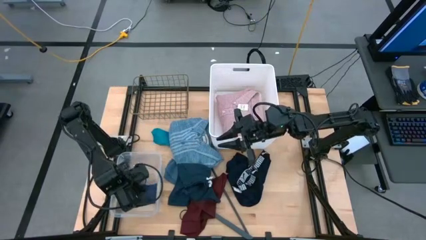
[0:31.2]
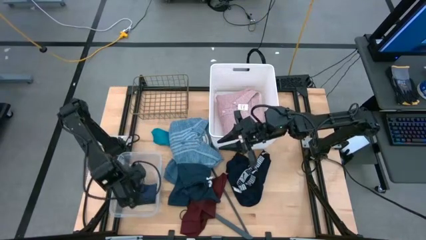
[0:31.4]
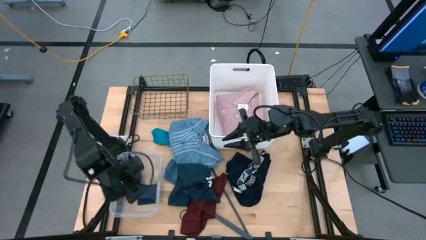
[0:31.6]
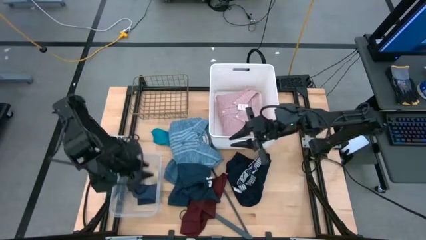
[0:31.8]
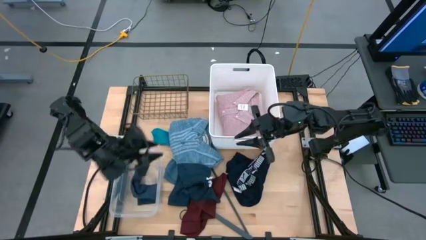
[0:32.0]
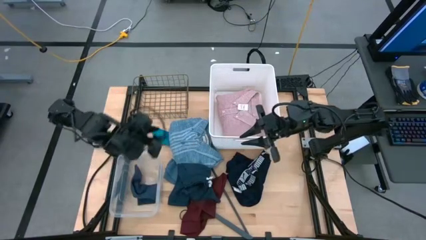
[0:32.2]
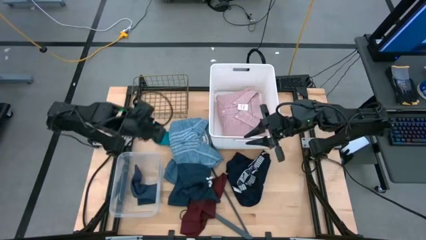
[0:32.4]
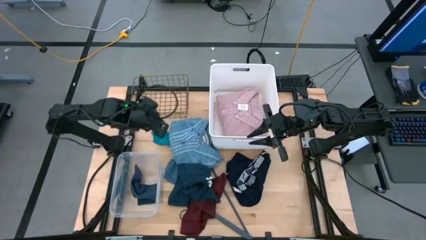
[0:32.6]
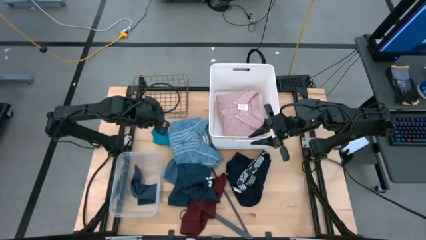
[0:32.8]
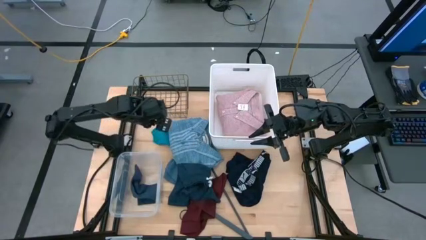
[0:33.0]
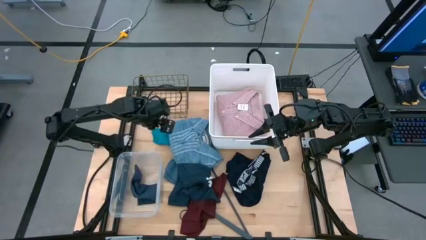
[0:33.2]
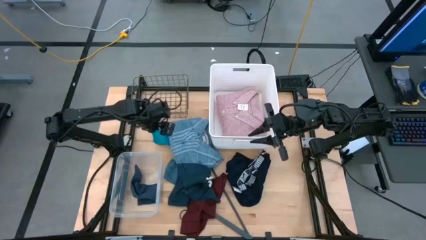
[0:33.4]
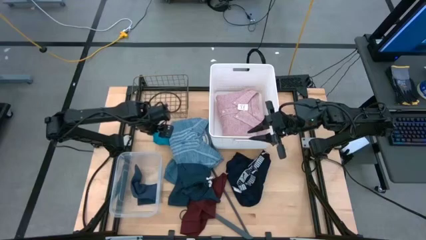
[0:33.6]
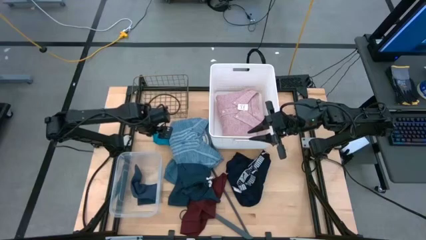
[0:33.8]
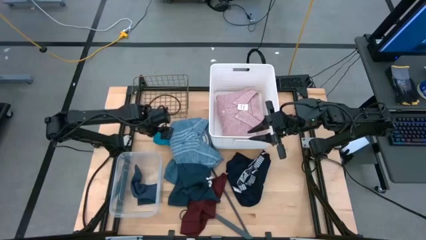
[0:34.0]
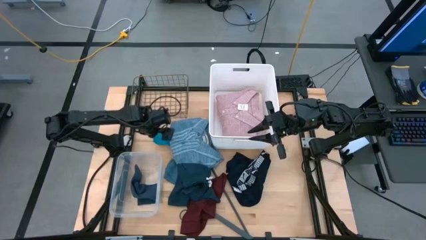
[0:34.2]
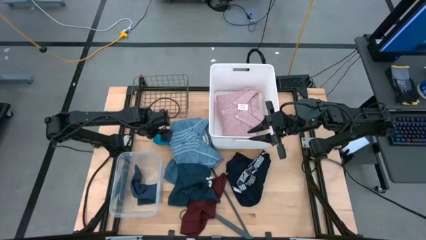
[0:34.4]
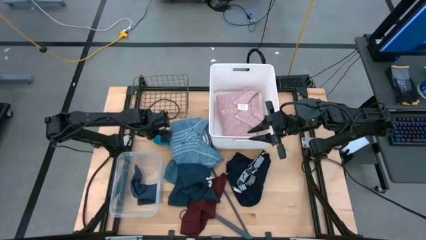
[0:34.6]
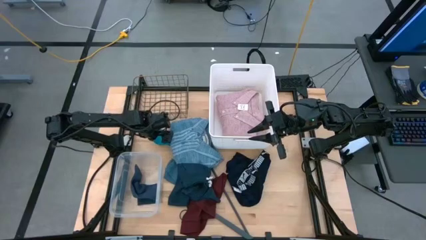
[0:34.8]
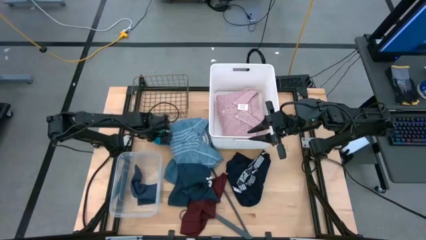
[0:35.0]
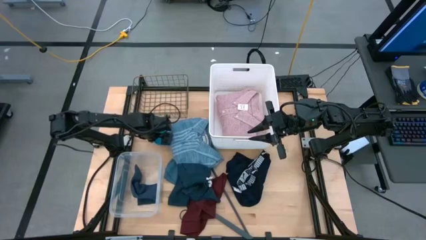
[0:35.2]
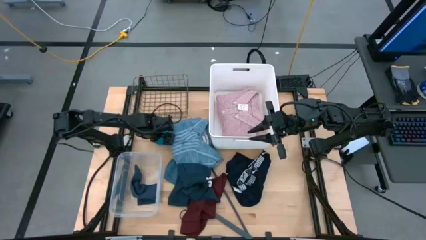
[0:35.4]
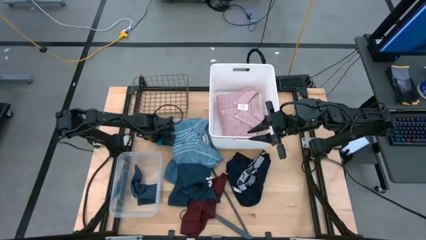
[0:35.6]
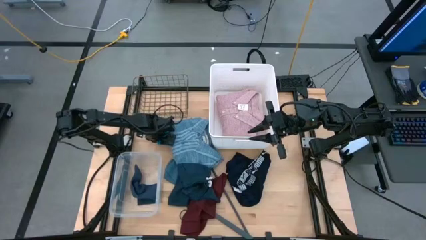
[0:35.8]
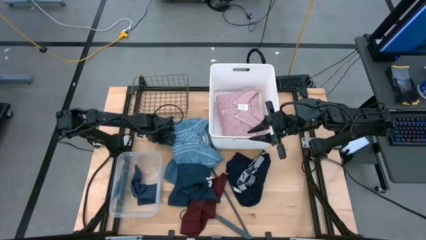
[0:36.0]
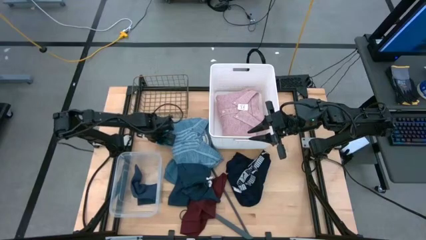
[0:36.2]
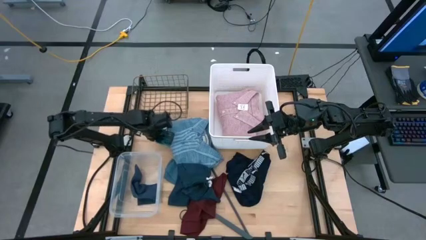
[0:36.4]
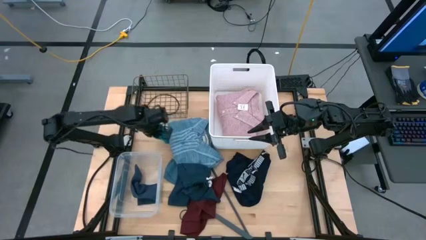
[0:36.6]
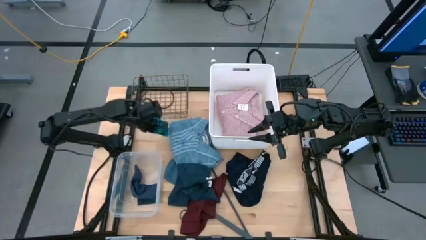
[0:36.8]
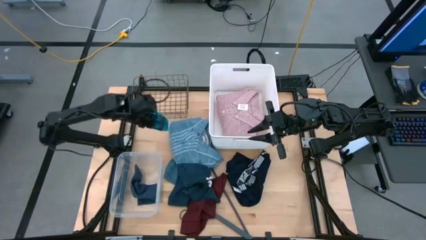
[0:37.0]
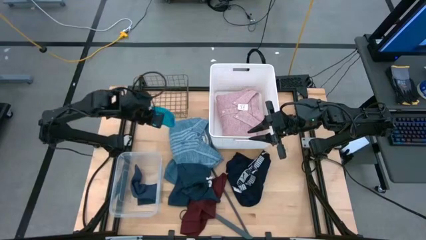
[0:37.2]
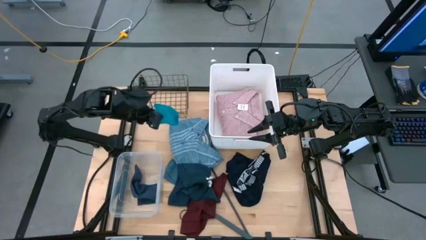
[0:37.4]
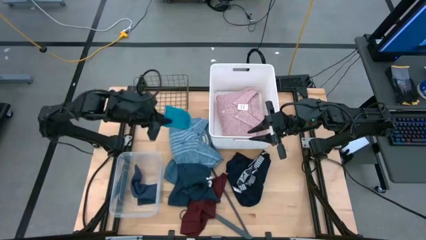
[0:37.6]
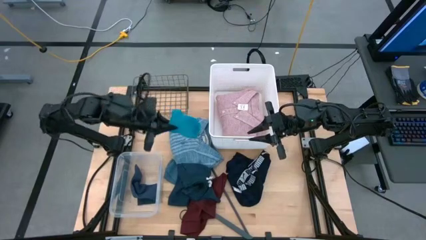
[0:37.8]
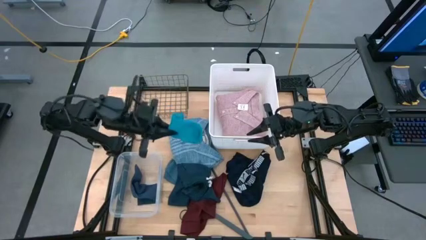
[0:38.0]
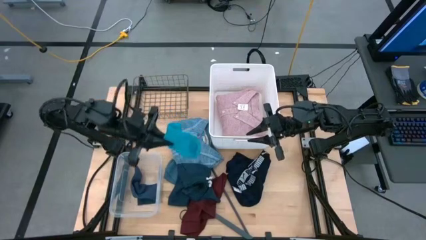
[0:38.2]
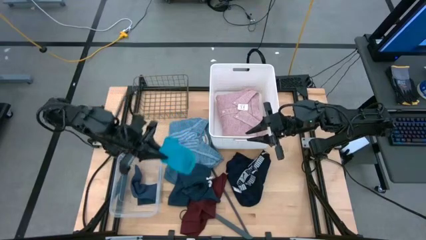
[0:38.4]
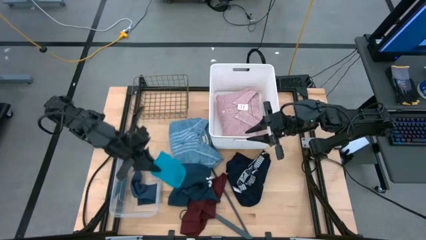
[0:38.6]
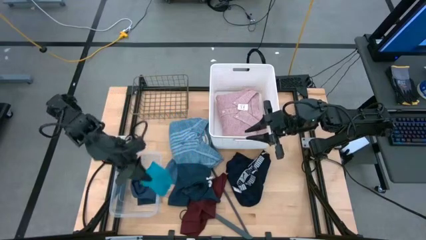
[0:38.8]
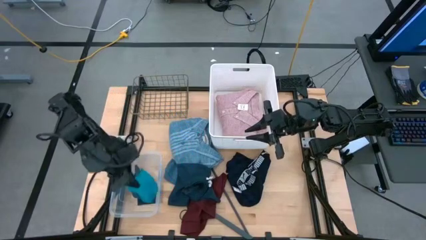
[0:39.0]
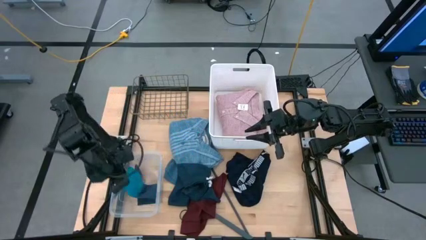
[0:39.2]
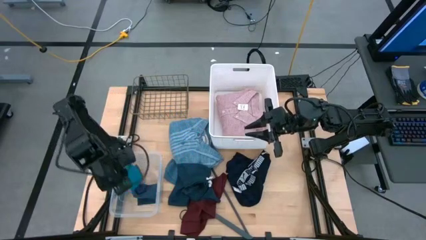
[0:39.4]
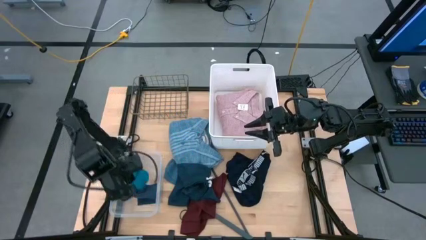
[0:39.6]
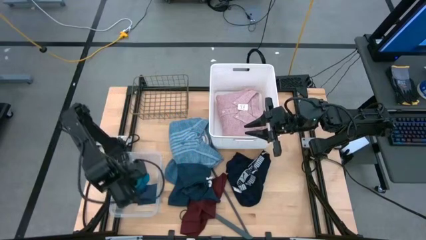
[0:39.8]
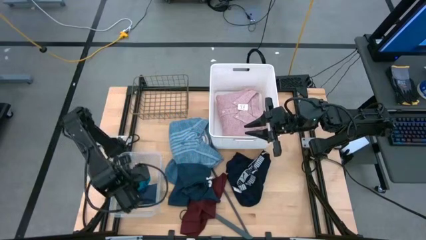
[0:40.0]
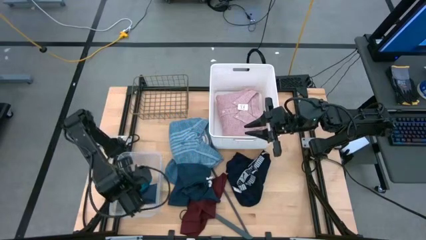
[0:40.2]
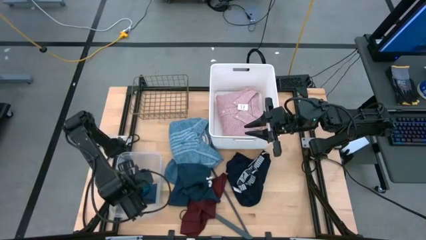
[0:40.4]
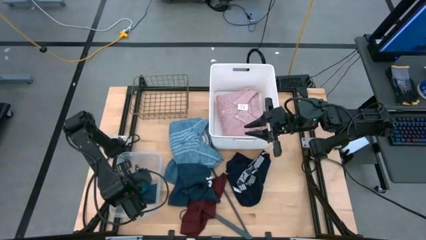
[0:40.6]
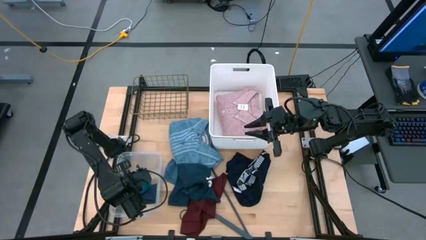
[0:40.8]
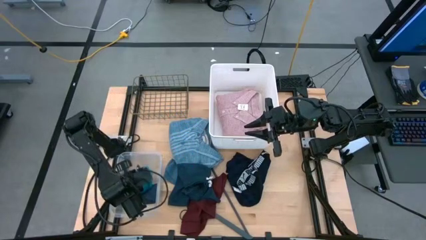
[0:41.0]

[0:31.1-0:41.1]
Task: Pick & Place Cloths
Put the blue sock into the transparent bin

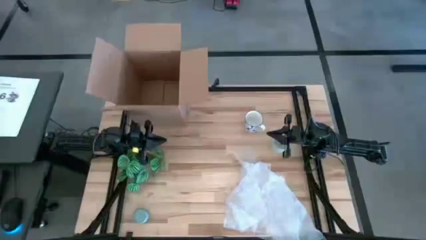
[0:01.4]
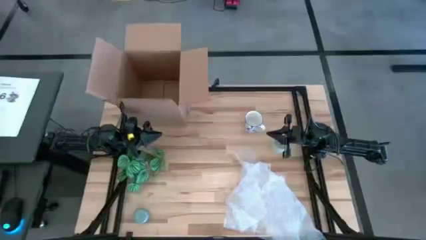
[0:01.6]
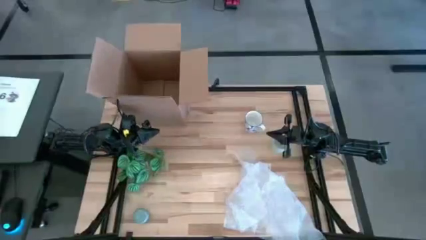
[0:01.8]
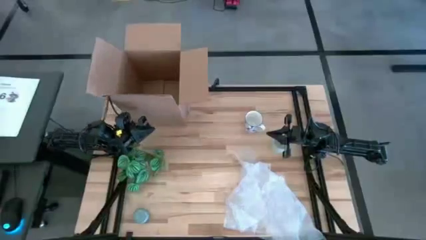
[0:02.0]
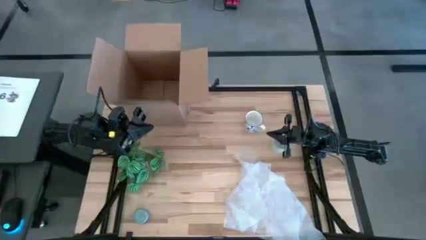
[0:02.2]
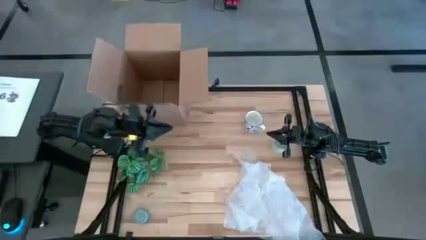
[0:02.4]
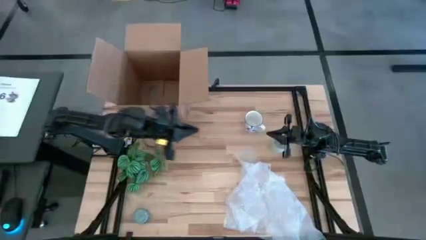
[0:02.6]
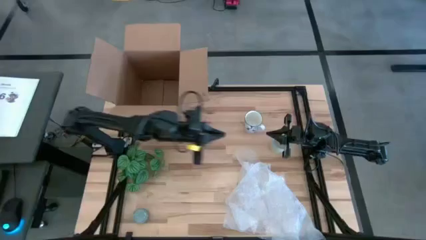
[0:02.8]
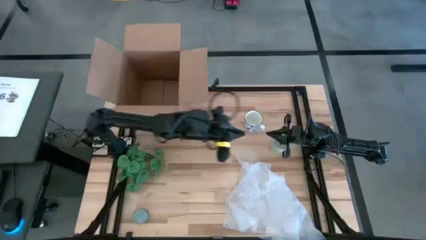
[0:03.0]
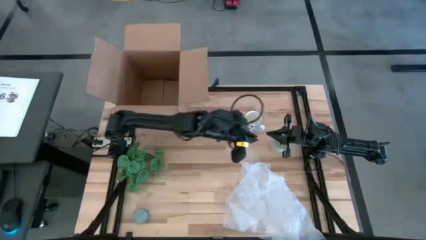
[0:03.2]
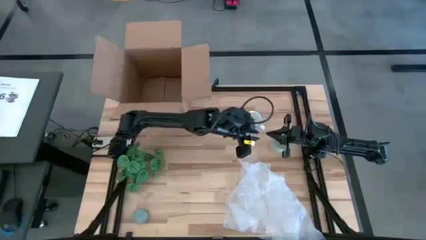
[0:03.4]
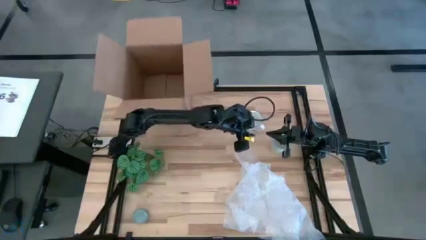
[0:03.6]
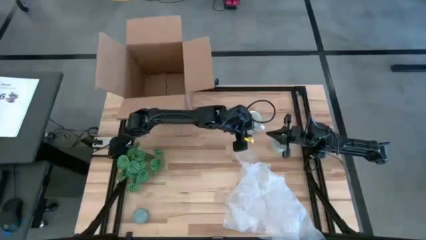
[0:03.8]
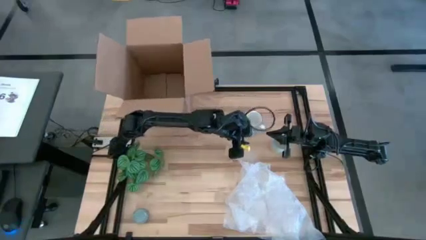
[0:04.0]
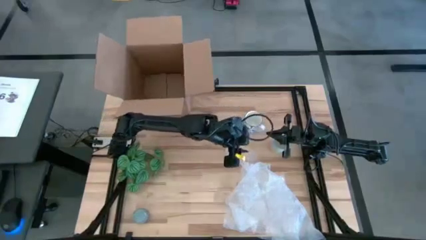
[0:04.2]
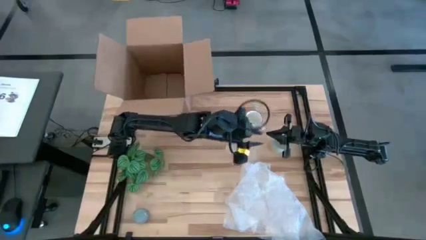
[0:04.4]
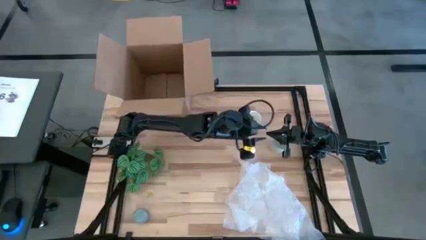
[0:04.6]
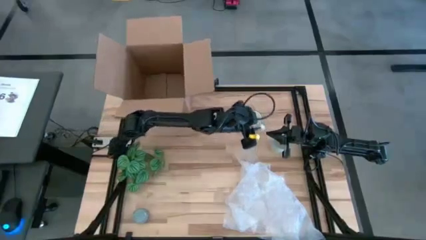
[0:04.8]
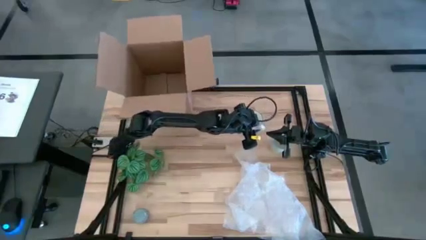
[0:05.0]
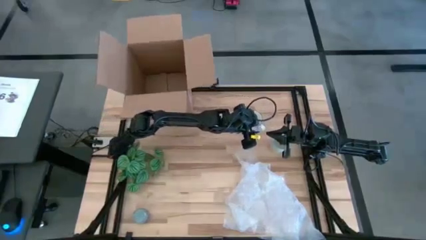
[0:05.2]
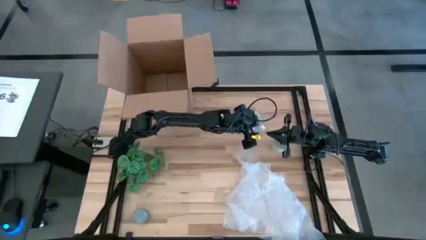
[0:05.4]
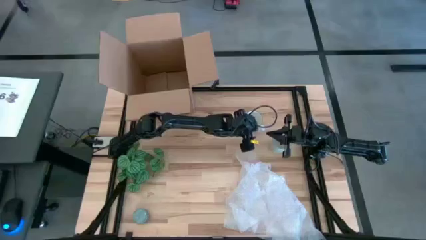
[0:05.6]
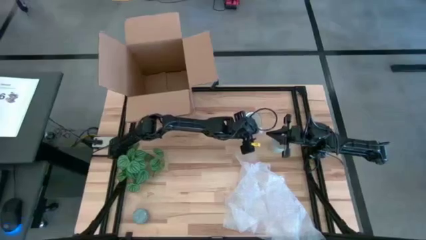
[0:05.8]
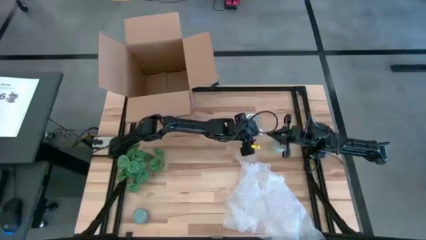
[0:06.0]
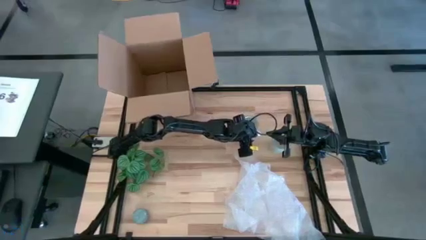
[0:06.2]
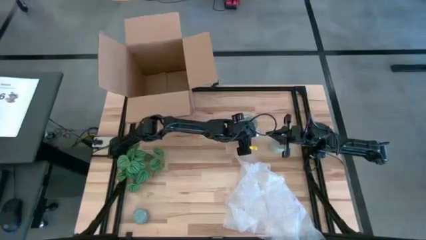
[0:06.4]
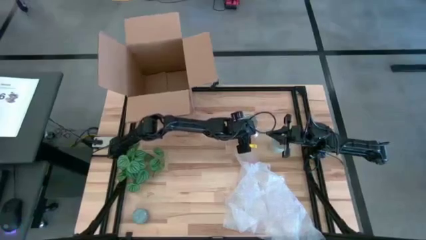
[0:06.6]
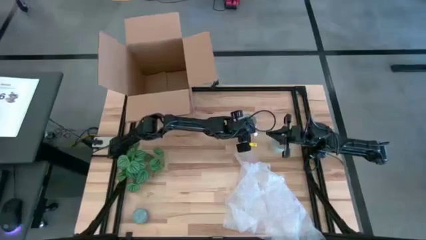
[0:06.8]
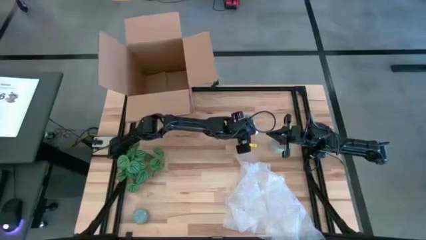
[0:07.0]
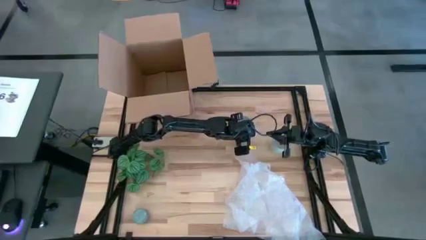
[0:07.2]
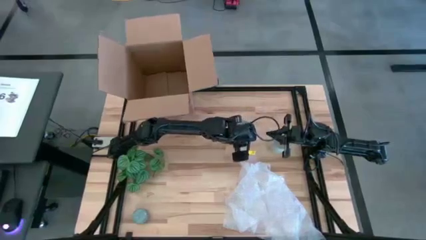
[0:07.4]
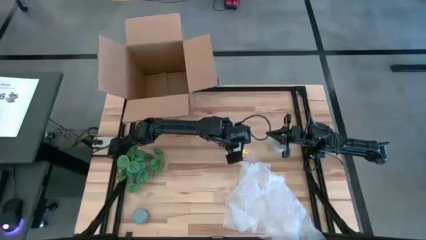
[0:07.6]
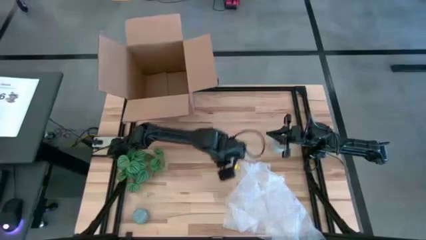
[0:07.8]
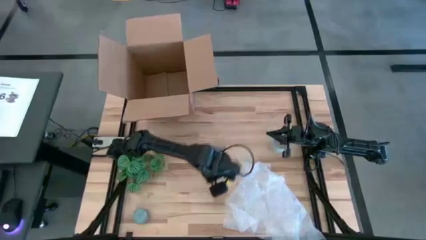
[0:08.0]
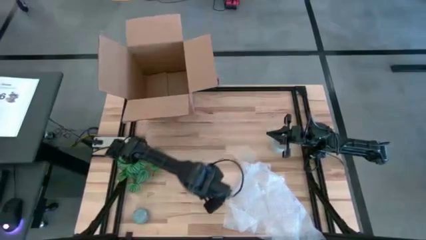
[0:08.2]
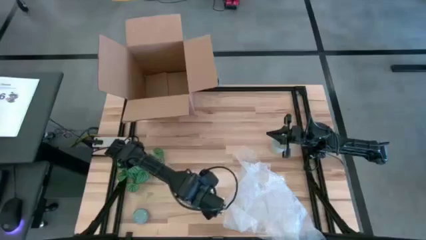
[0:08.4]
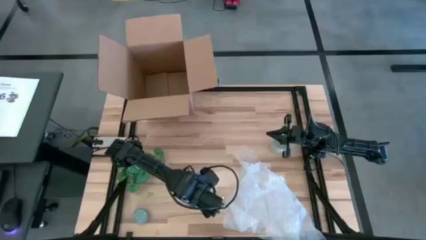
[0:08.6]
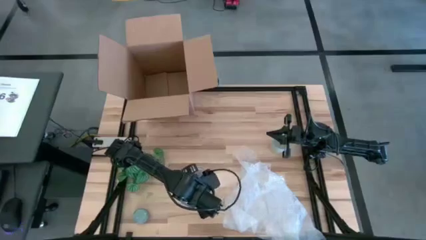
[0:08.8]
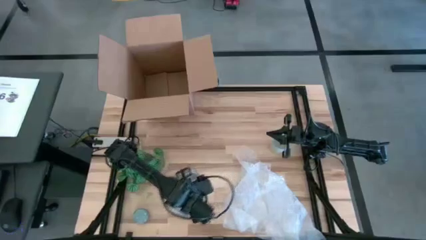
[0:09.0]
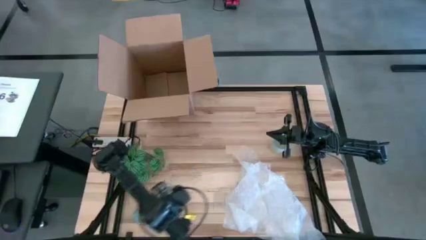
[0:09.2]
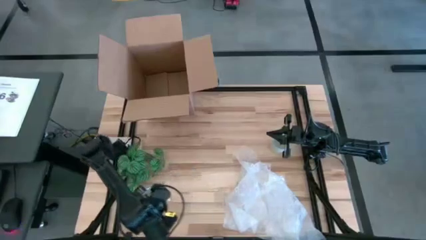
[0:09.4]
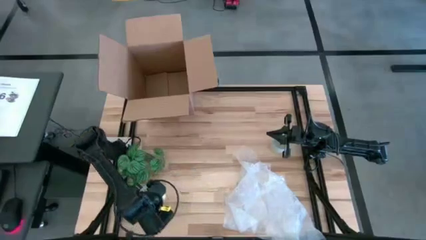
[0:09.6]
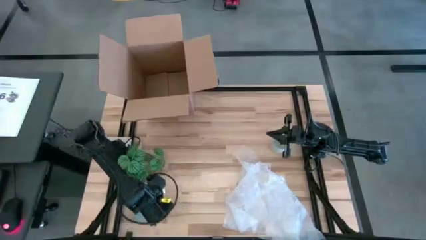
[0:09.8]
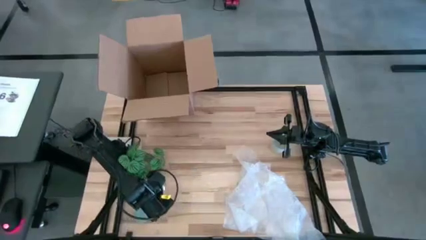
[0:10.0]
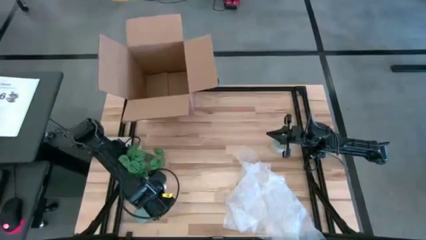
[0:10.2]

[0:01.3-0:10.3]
Task: wrap mug
Move the blue mug to the bottom left of the table
